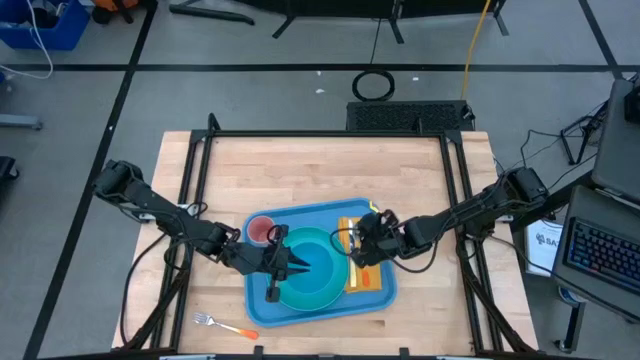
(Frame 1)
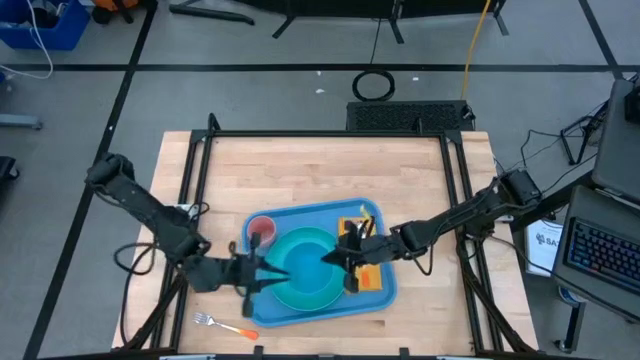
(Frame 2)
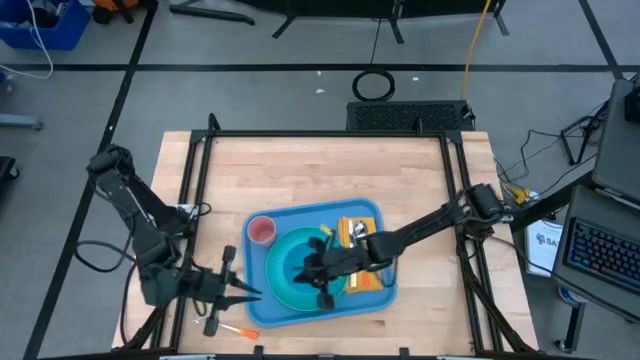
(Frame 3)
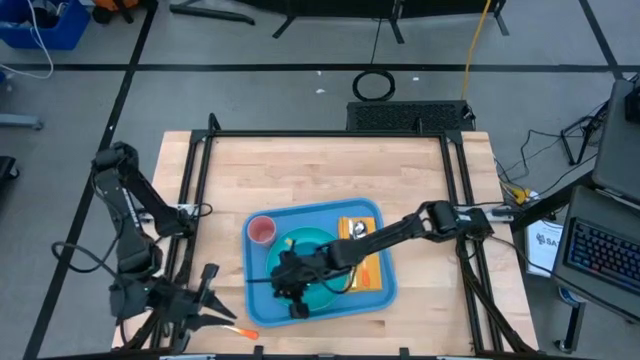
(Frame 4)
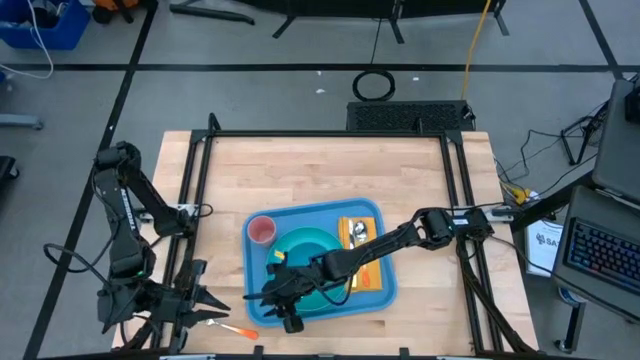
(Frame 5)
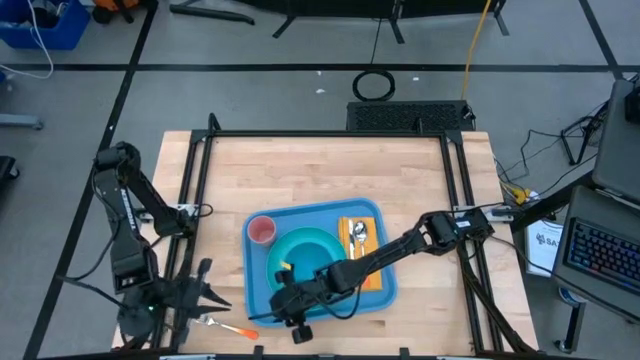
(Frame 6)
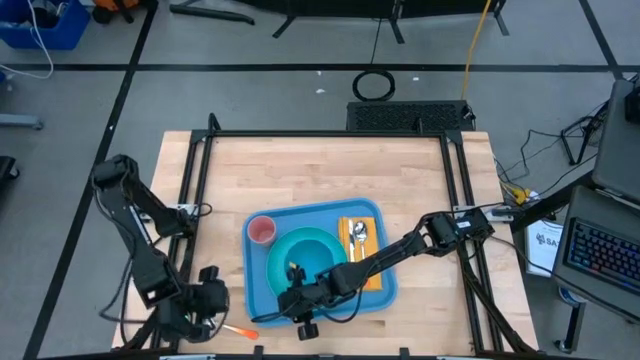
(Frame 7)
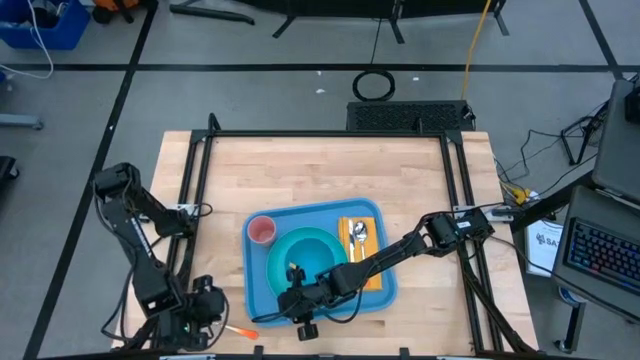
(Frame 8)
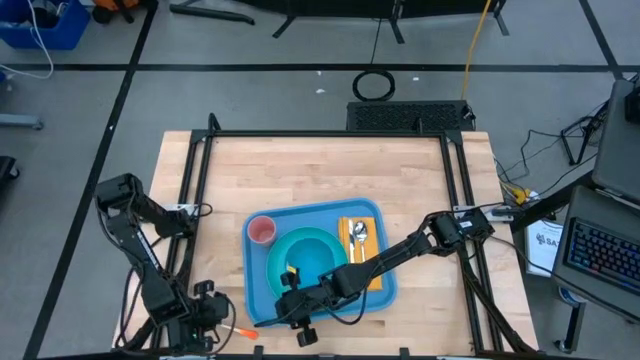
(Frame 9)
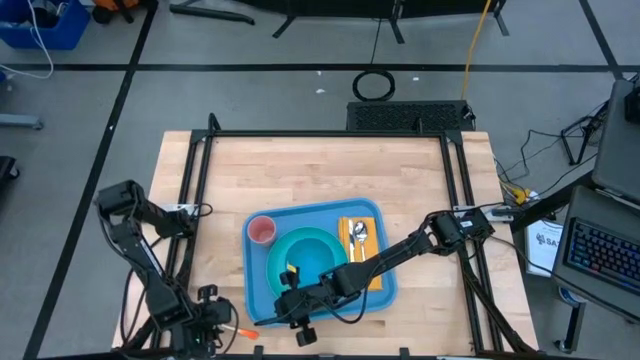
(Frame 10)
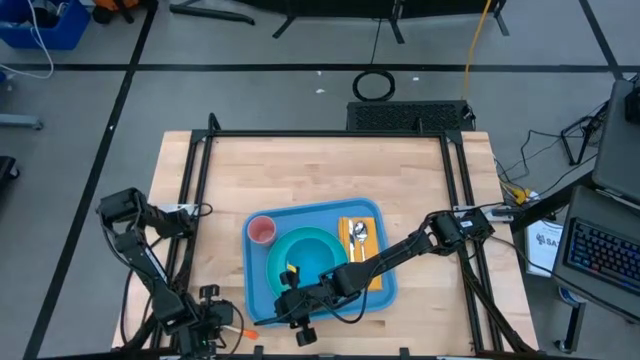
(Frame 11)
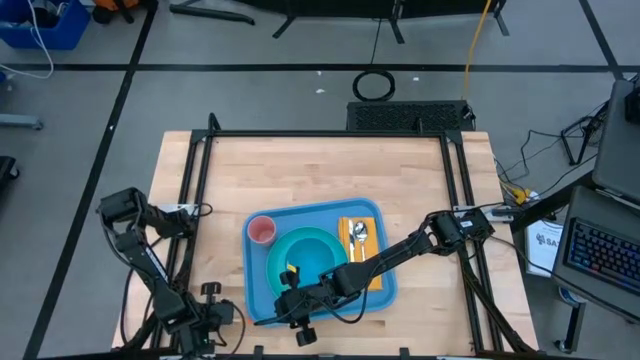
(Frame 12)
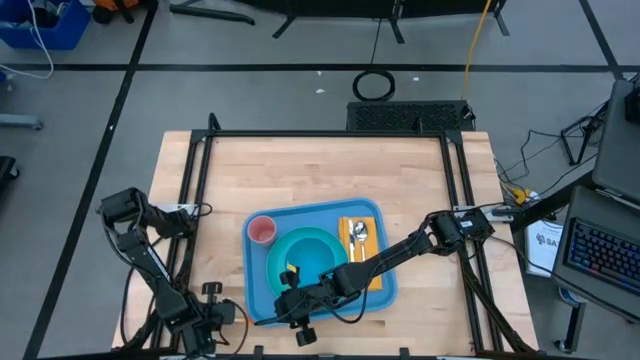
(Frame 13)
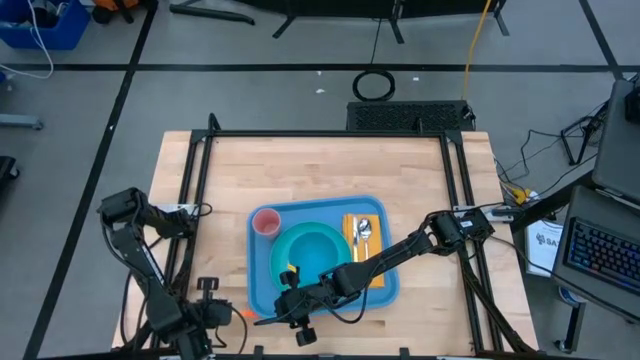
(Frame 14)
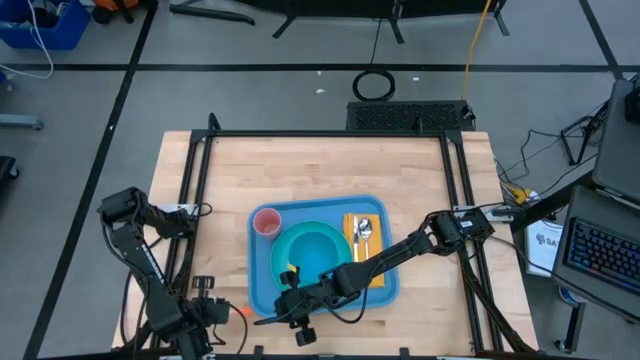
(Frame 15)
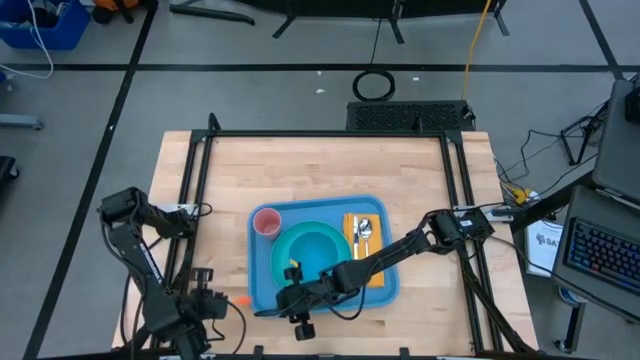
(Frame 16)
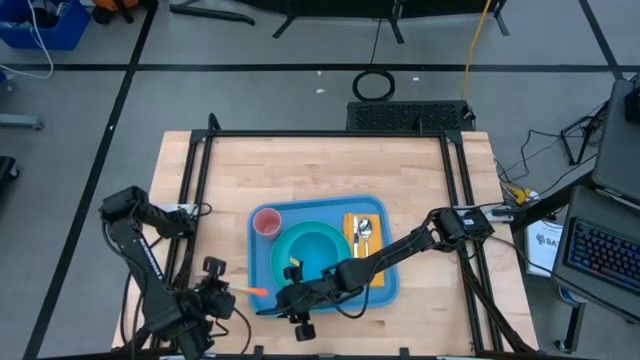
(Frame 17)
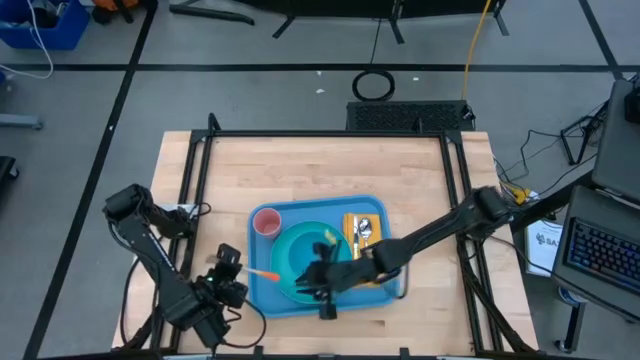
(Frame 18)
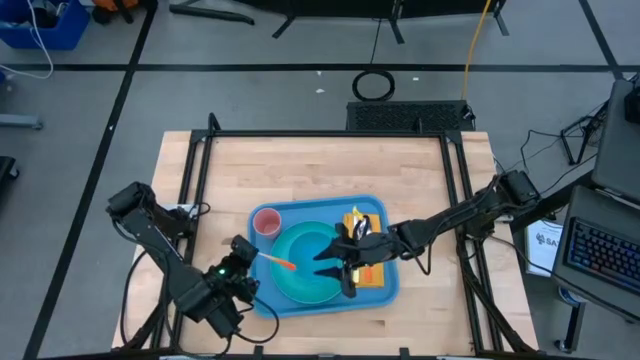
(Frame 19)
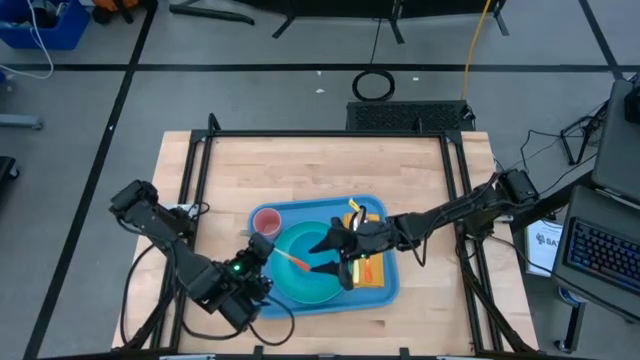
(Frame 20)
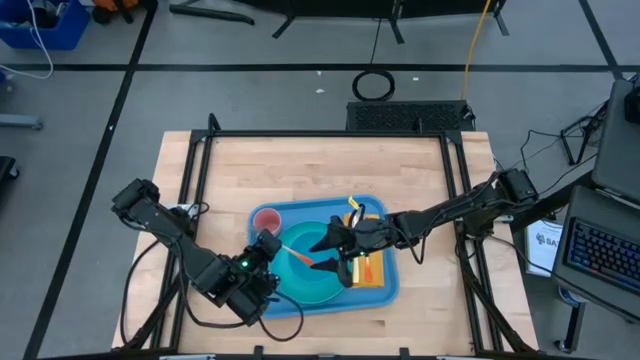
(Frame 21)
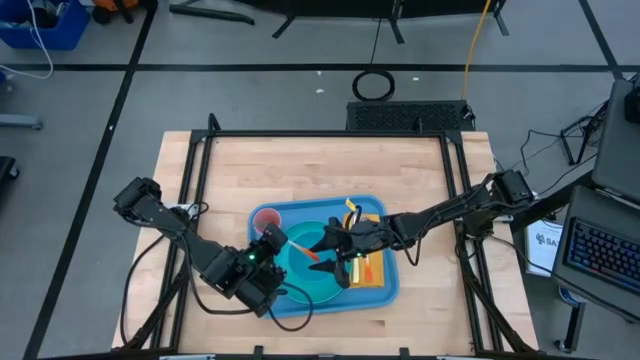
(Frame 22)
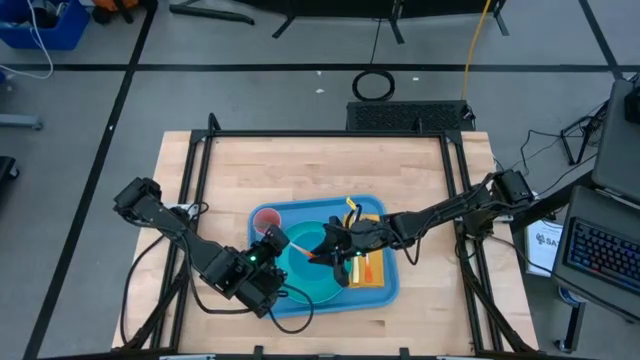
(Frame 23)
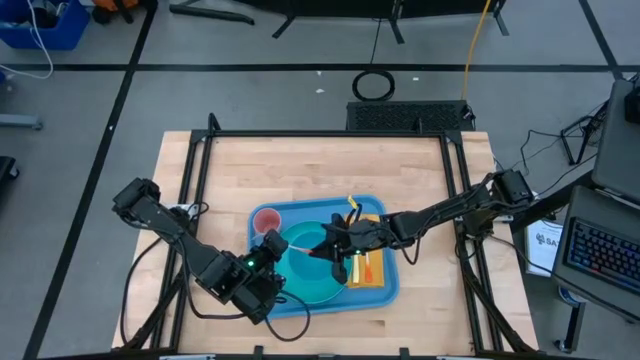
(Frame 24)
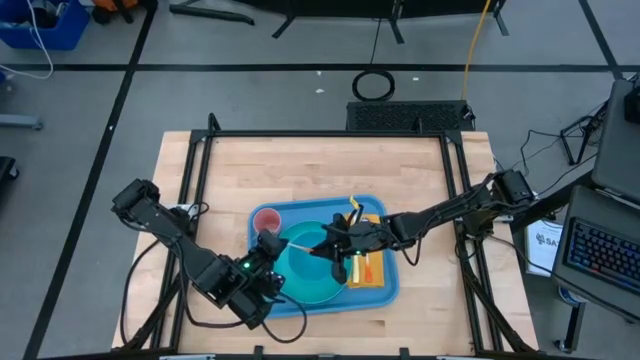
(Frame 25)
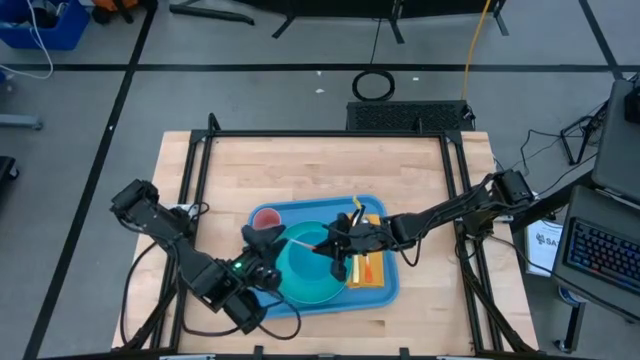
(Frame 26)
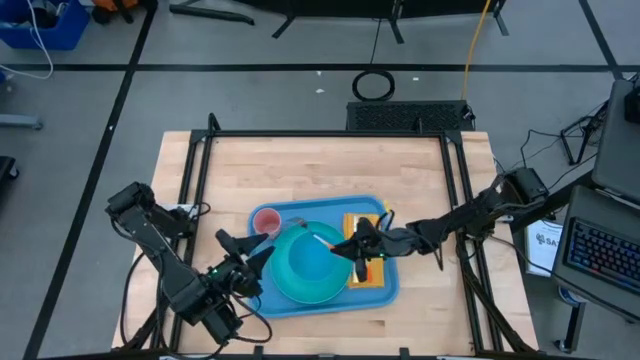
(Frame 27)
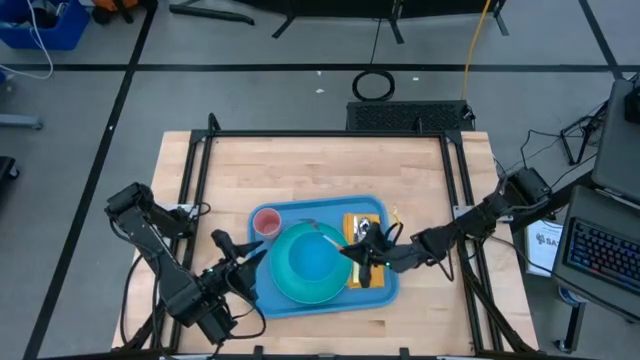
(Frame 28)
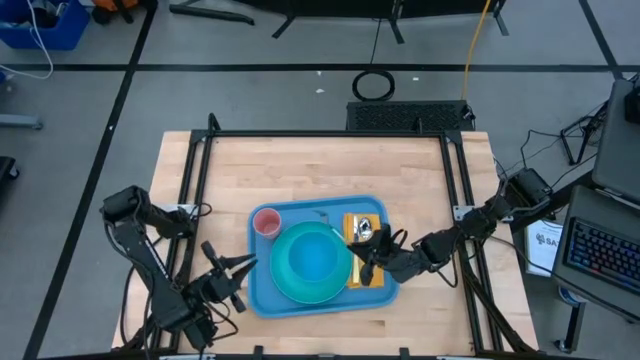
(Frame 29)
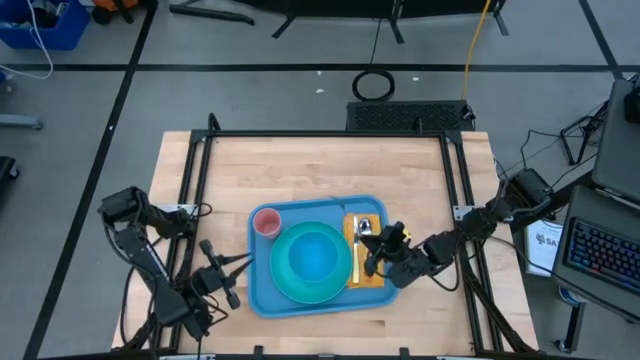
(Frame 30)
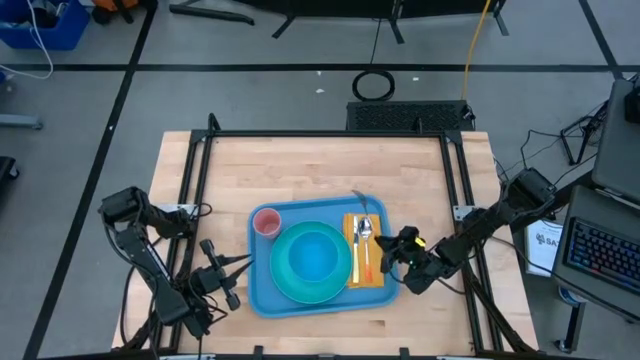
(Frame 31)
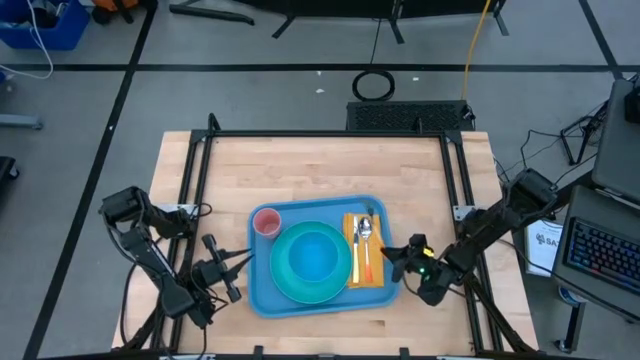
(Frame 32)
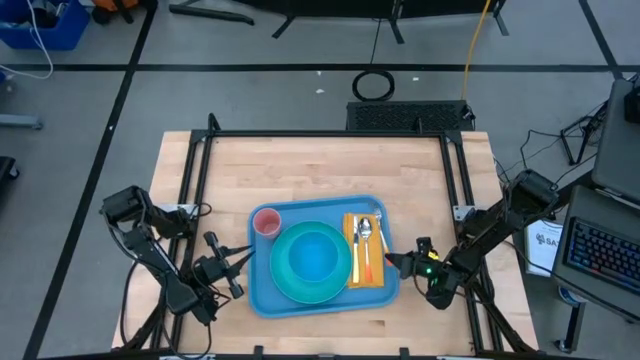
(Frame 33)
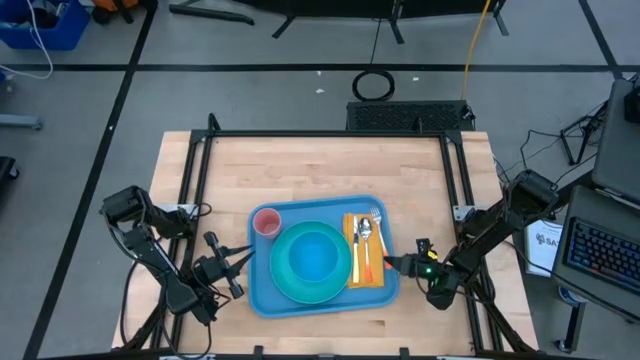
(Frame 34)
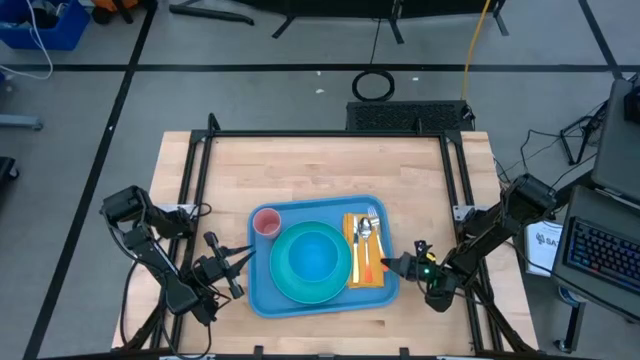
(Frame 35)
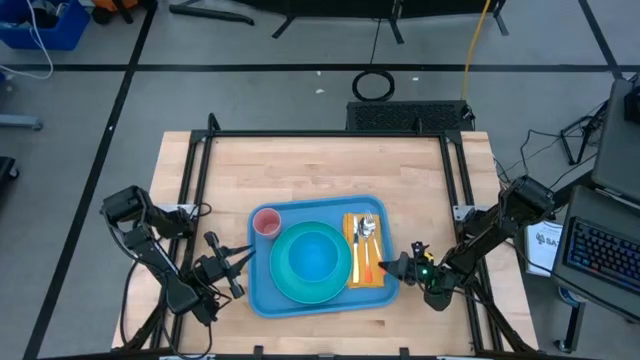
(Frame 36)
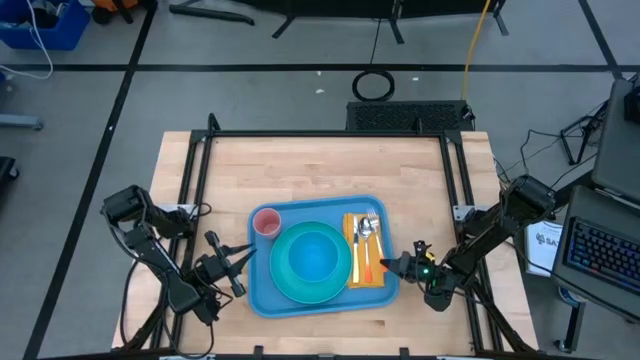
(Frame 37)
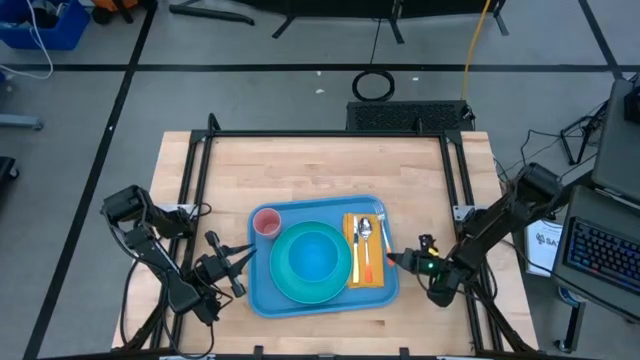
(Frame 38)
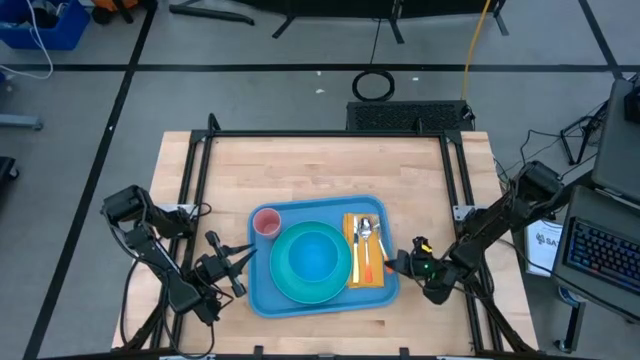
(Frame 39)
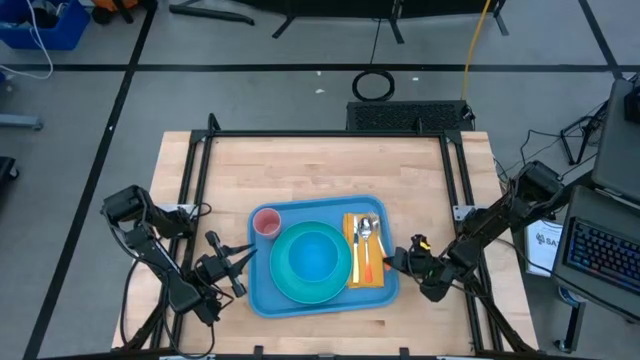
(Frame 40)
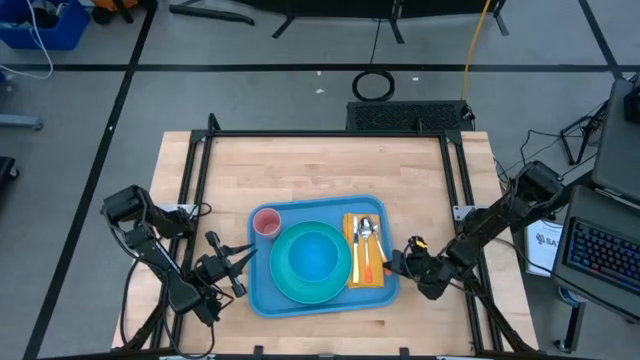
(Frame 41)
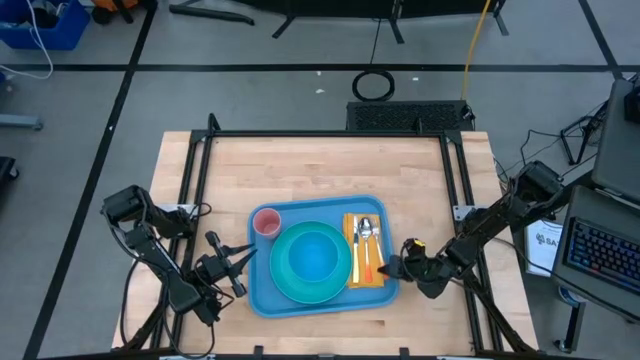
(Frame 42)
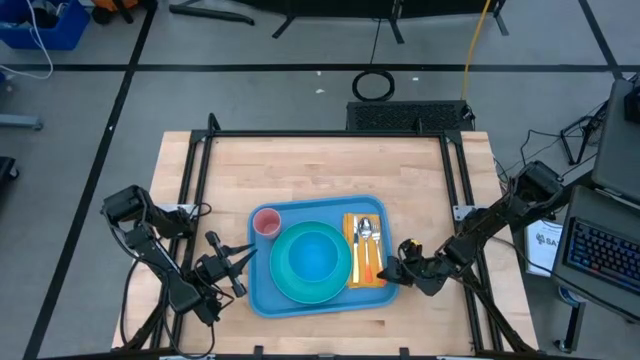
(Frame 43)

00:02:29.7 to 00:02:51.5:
Task: Set up tray
Put the orange fork on the yellow napkin to the right of the orange spoon
